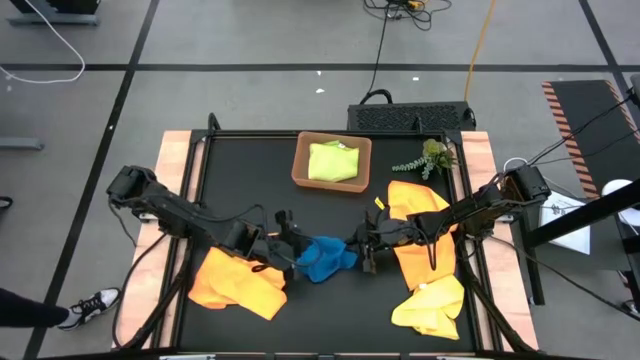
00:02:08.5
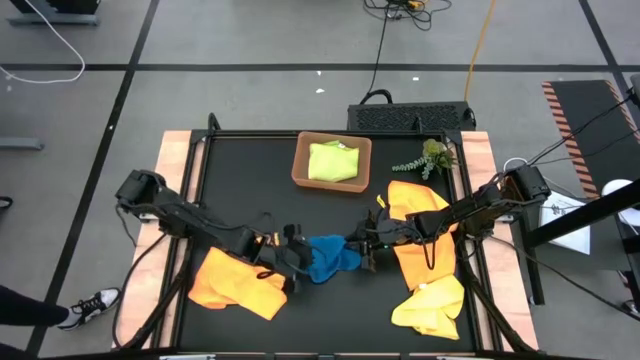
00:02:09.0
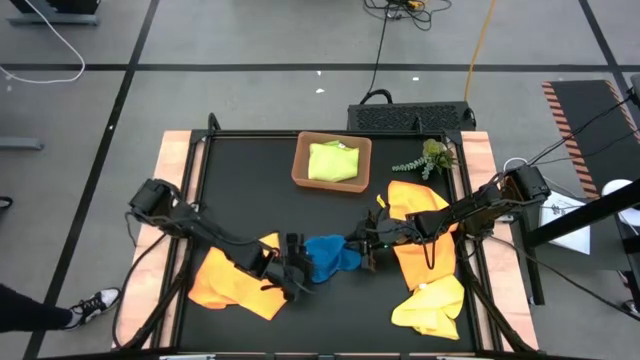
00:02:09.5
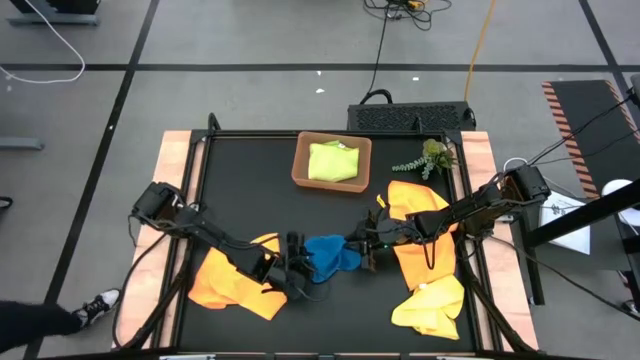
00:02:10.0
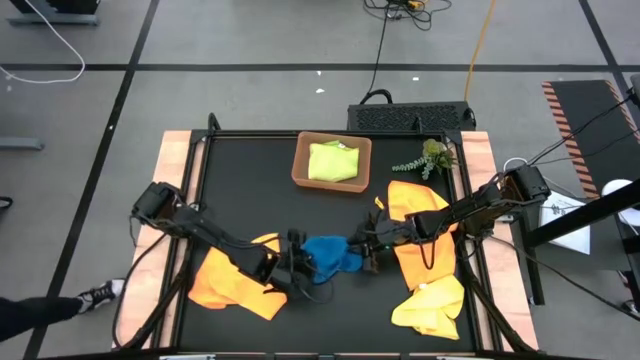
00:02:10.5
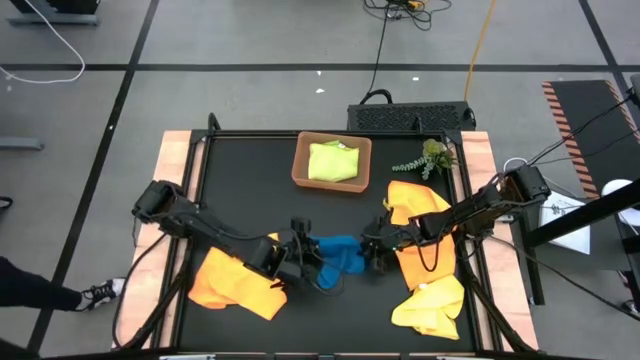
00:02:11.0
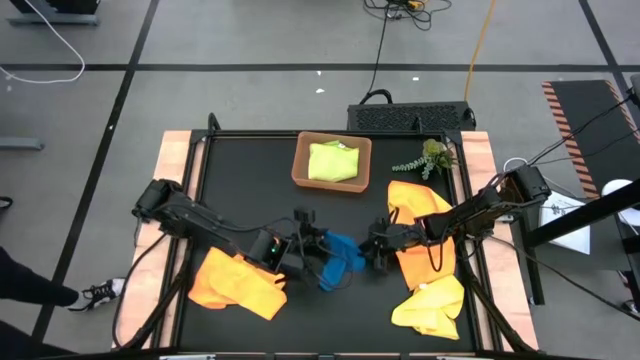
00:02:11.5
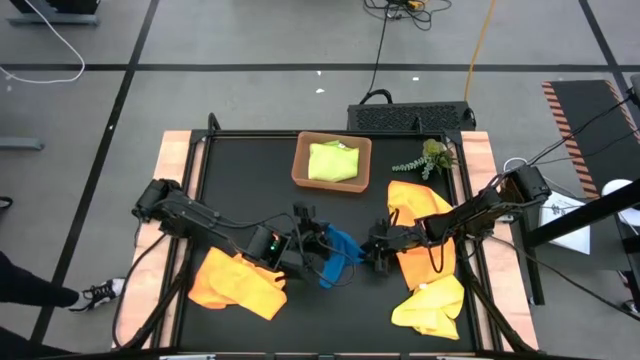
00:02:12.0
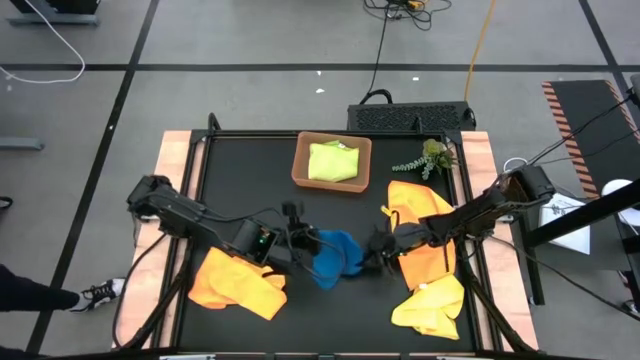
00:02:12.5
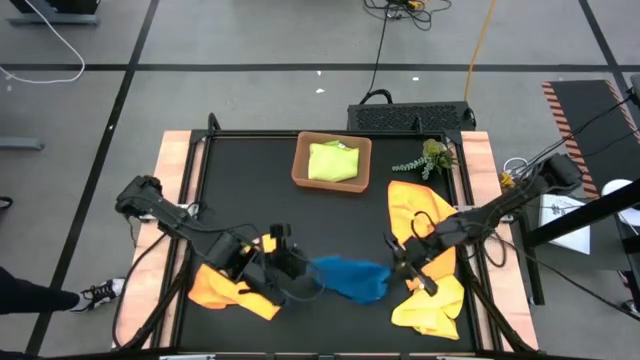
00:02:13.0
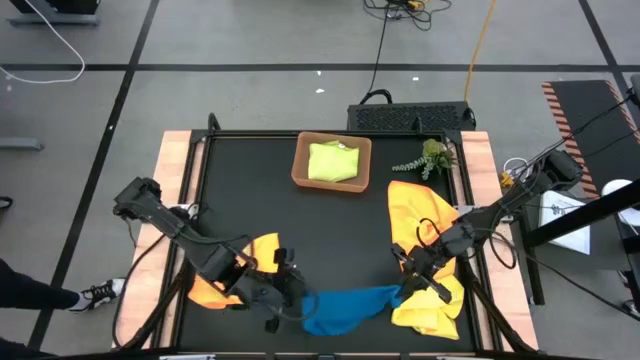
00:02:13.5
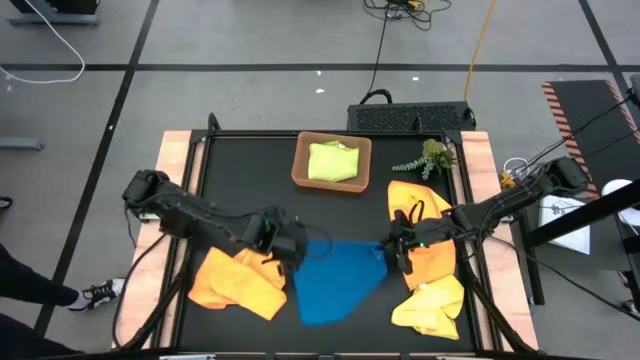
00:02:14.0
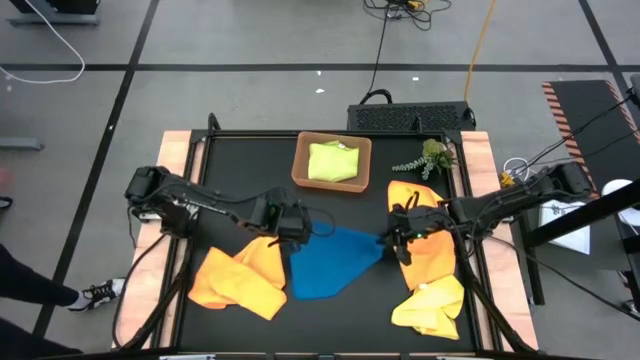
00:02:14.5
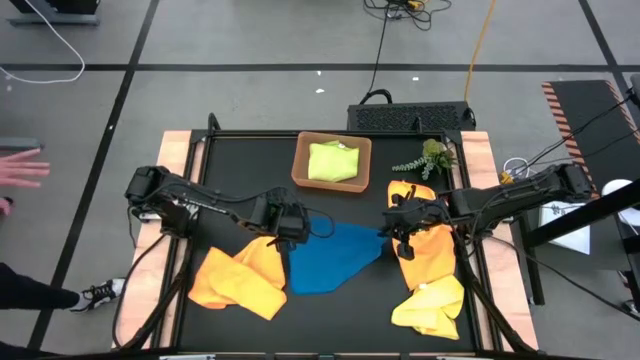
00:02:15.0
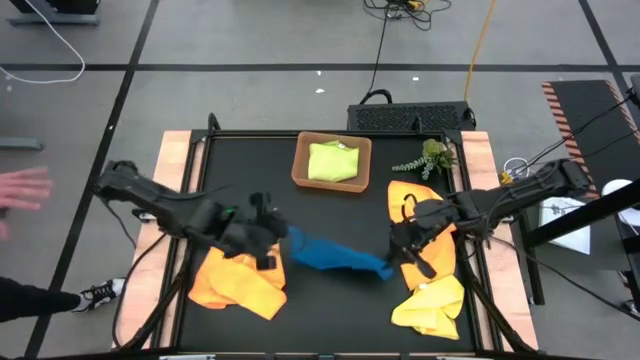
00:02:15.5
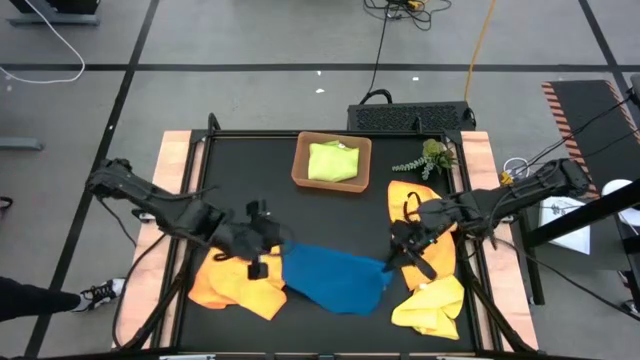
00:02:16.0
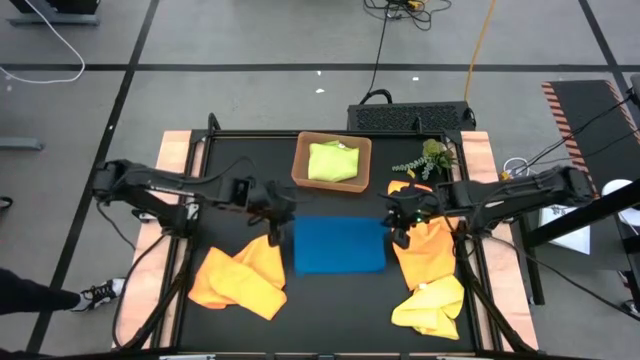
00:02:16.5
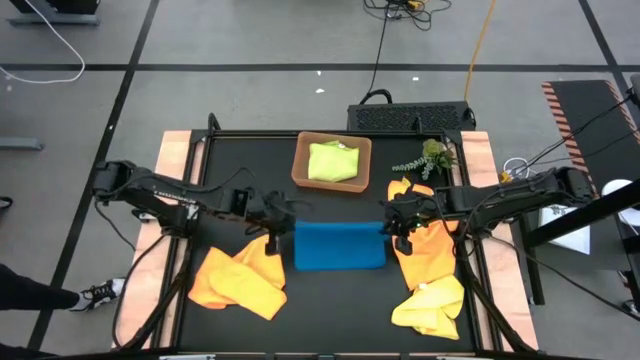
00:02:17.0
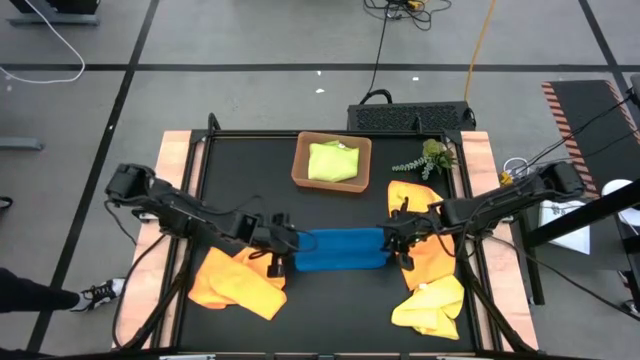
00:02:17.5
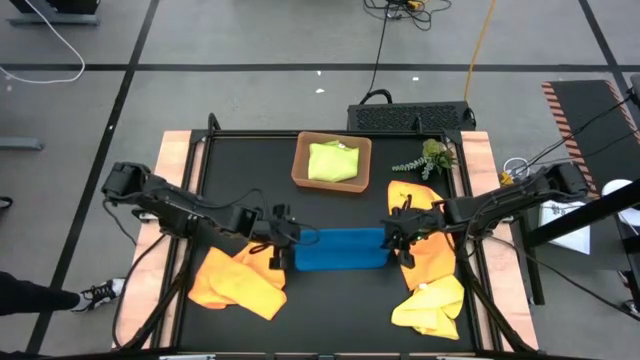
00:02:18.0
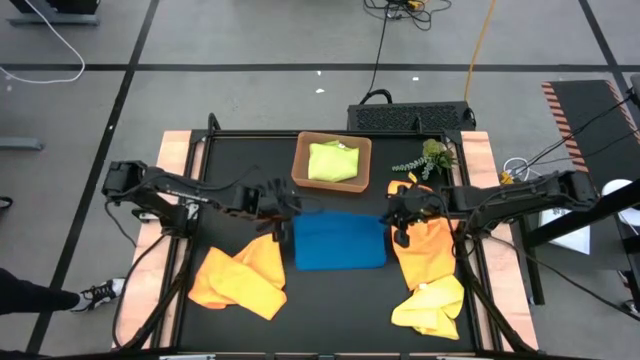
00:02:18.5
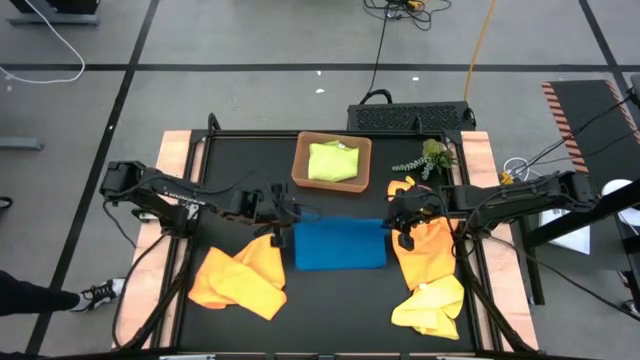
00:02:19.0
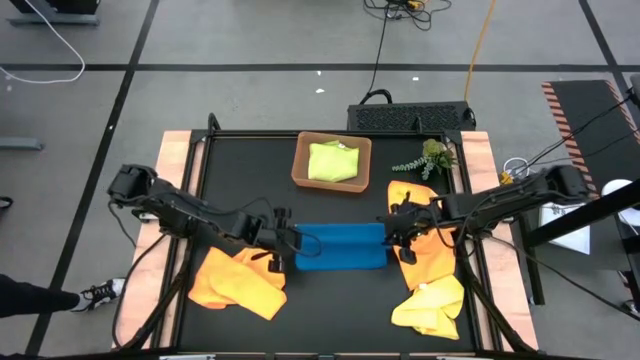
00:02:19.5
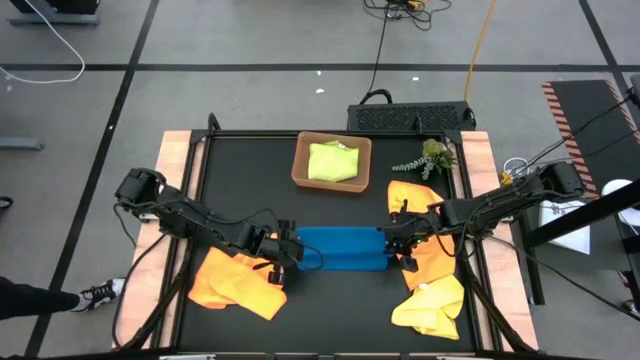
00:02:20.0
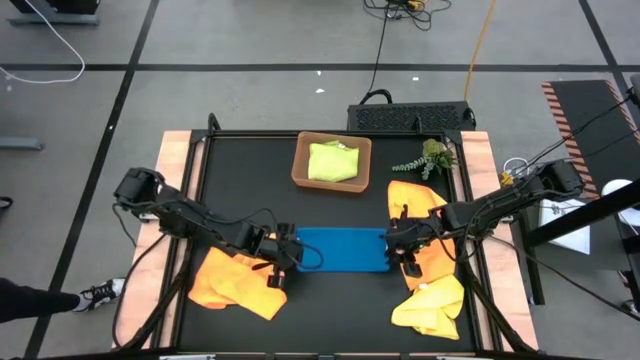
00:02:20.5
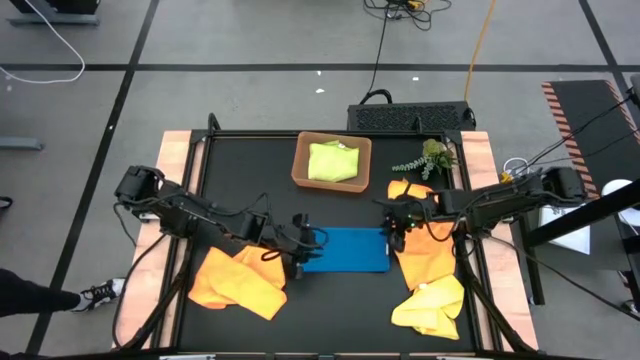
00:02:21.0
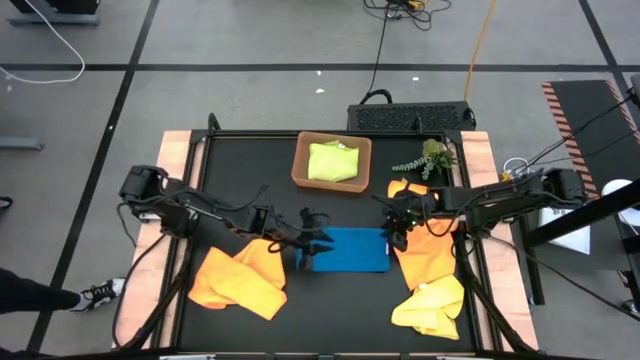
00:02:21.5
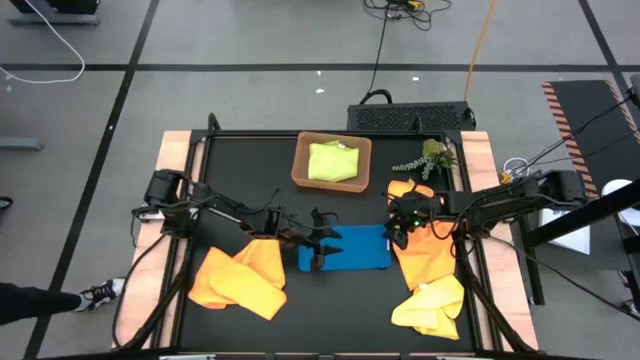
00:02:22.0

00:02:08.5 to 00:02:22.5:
Task: Fold microfiber towels
Fold the blue microfiber towel

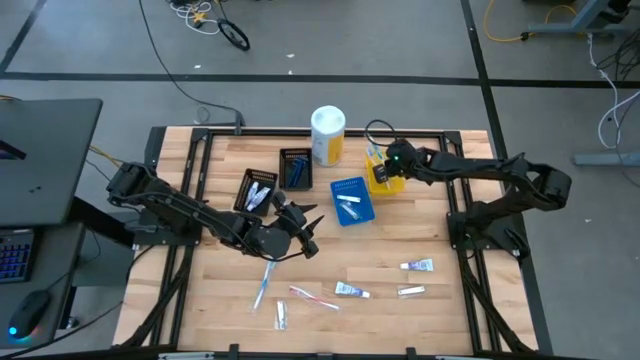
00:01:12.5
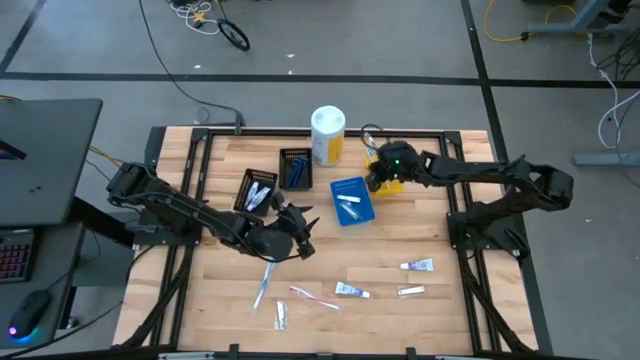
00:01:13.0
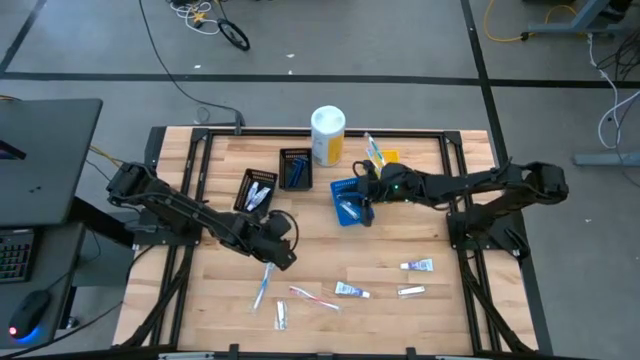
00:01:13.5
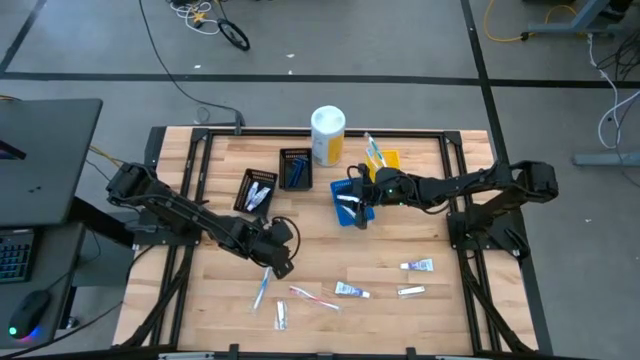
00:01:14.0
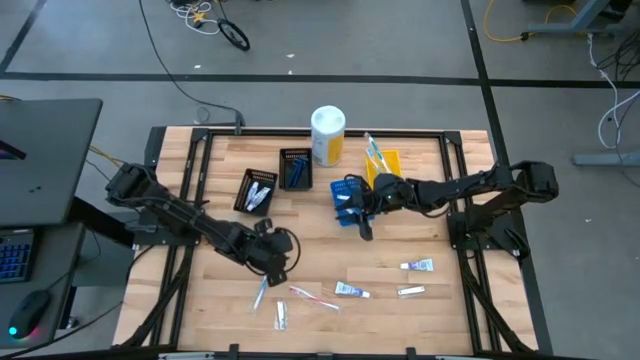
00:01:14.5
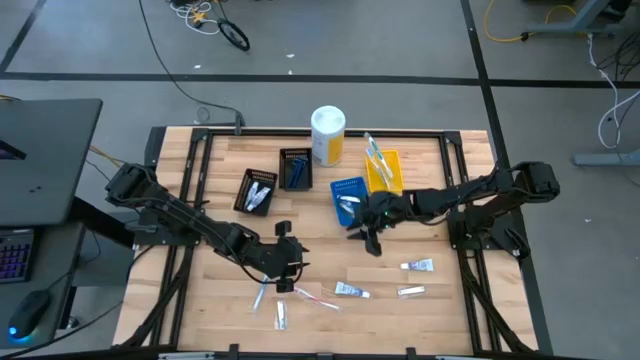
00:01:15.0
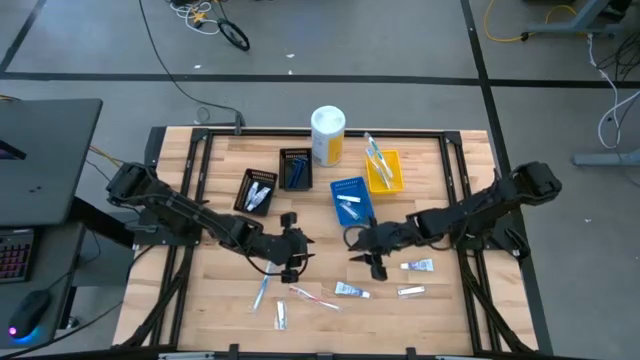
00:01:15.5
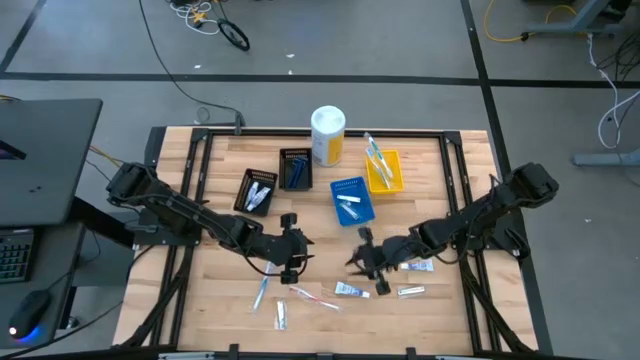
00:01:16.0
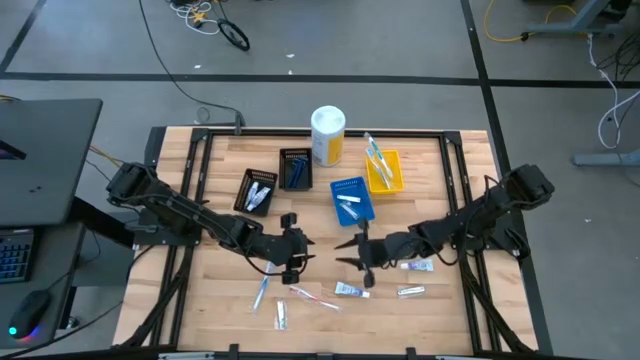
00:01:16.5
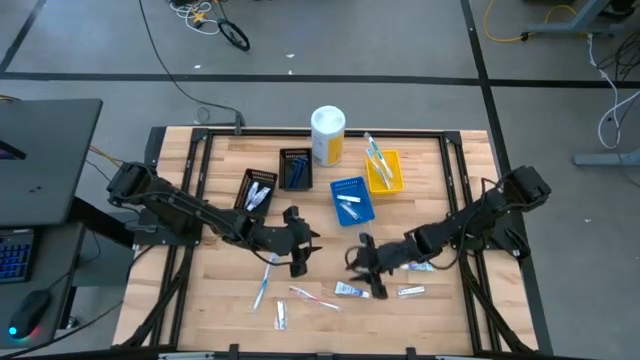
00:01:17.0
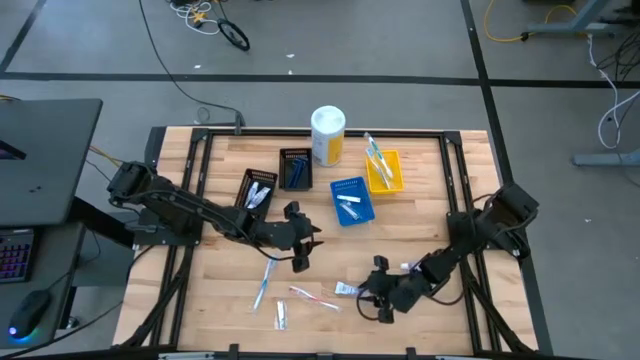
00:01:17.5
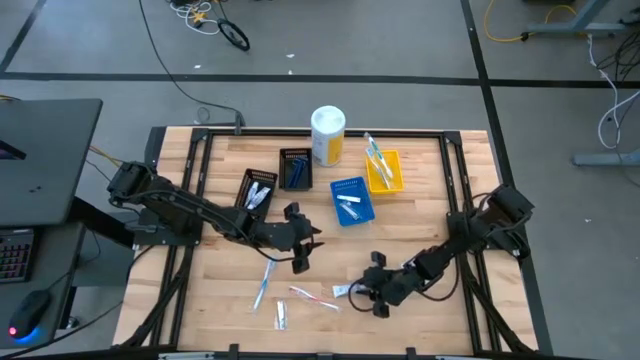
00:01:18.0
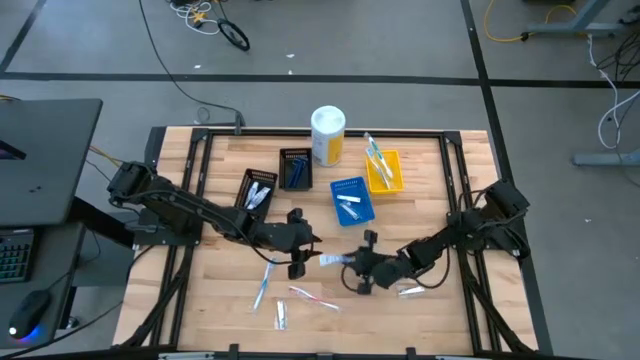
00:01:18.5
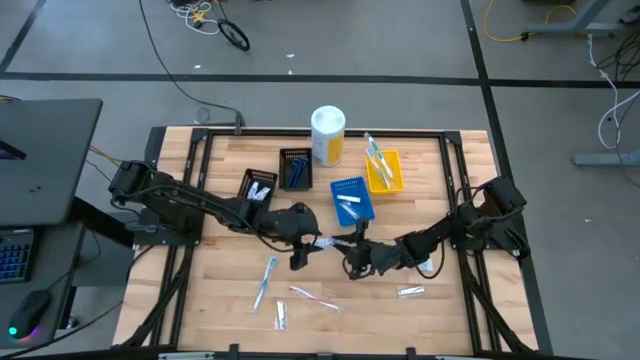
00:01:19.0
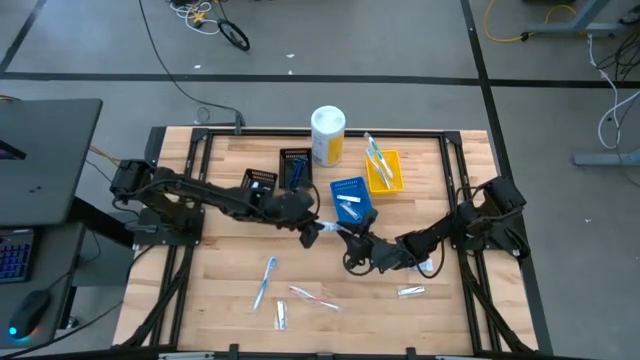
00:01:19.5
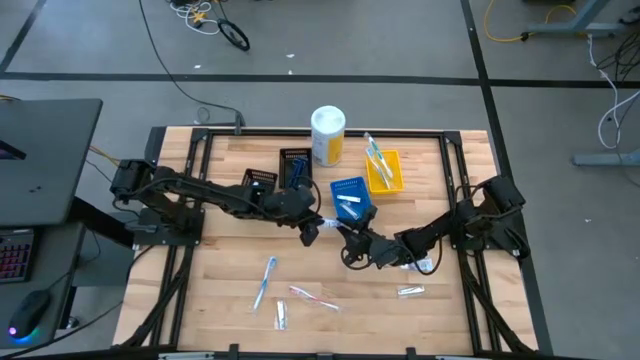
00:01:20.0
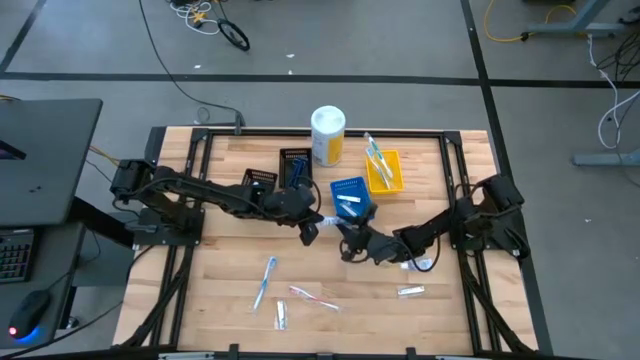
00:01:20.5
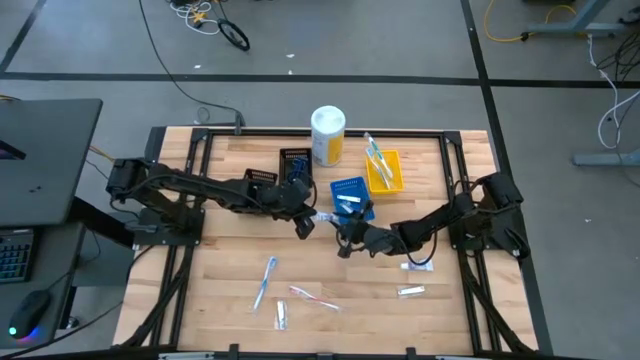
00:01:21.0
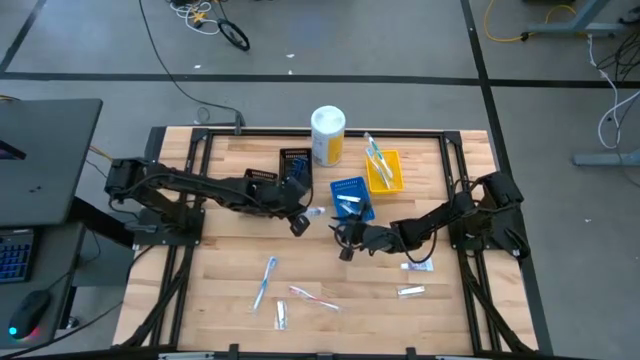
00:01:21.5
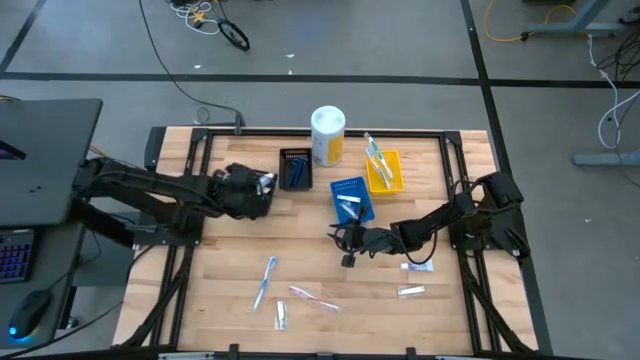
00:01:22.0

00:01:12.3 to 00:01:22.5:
Task: Pick & Place Travel size toiletries
Put the white toothpaste into the left black bin
